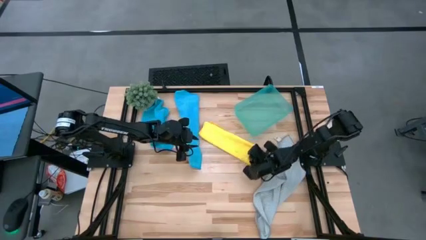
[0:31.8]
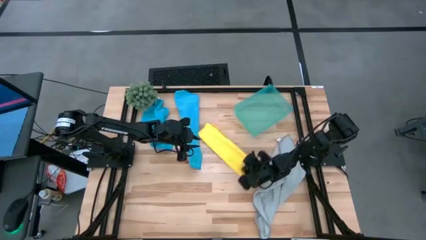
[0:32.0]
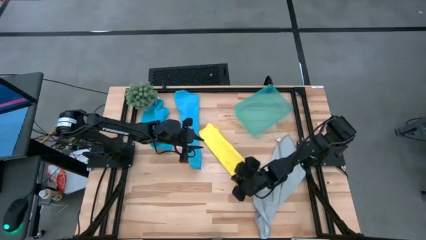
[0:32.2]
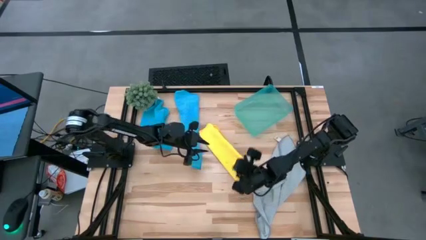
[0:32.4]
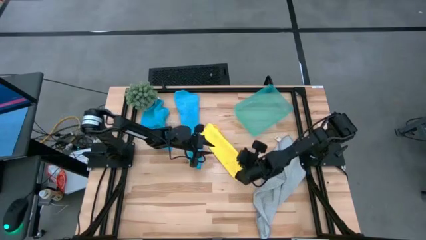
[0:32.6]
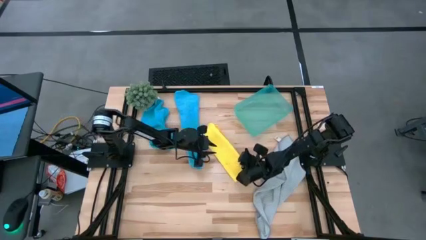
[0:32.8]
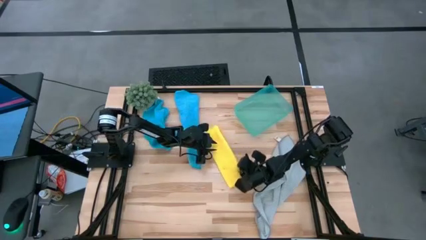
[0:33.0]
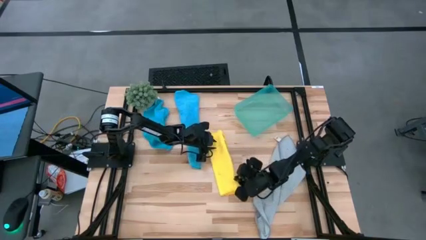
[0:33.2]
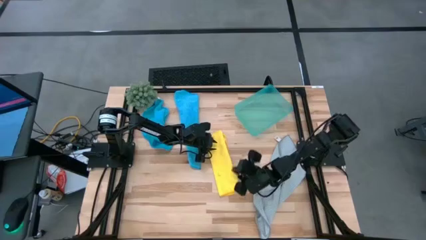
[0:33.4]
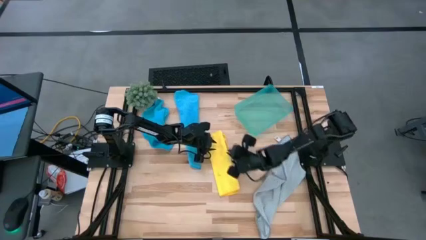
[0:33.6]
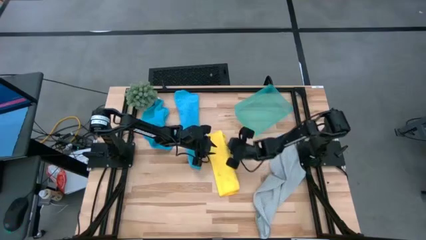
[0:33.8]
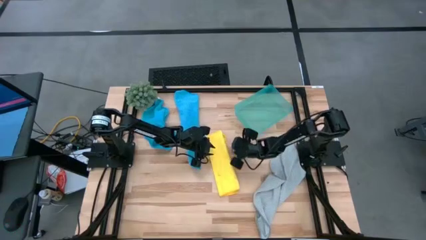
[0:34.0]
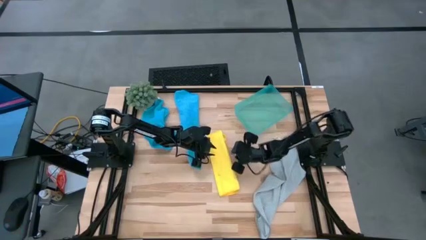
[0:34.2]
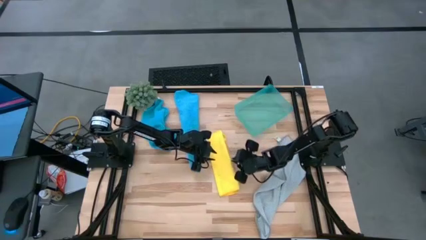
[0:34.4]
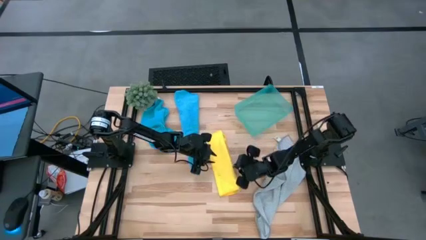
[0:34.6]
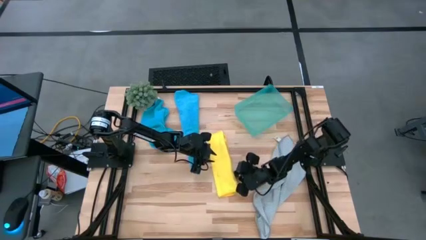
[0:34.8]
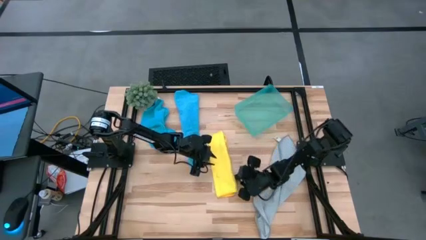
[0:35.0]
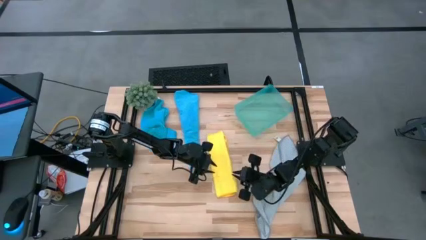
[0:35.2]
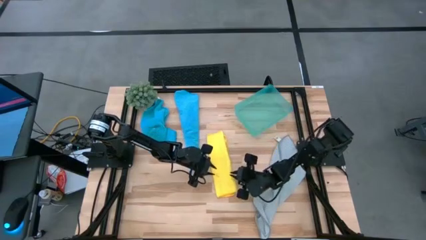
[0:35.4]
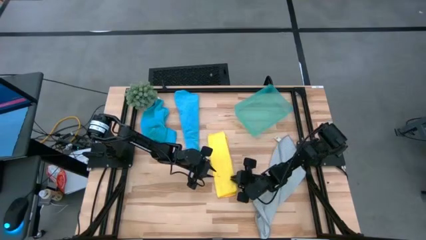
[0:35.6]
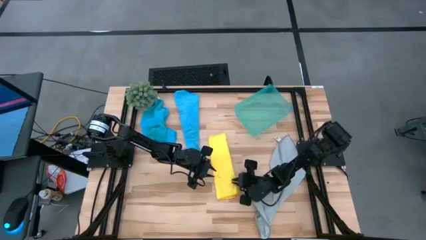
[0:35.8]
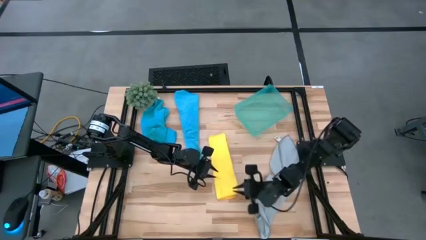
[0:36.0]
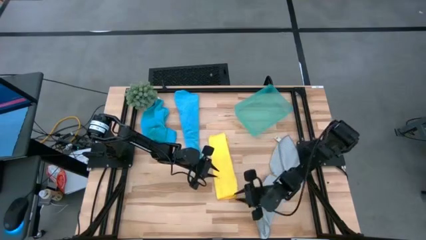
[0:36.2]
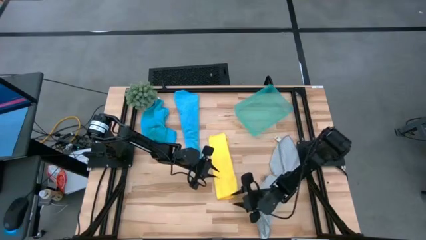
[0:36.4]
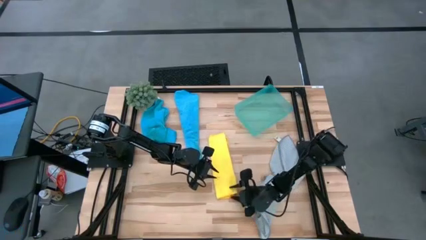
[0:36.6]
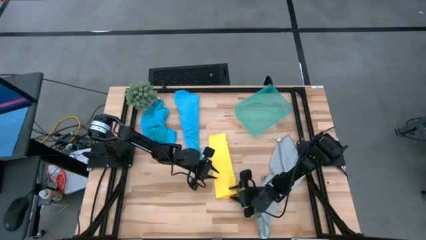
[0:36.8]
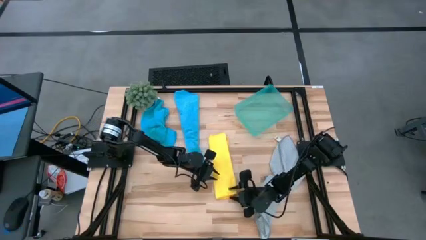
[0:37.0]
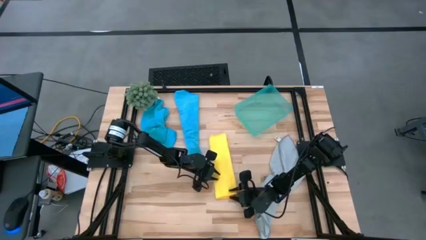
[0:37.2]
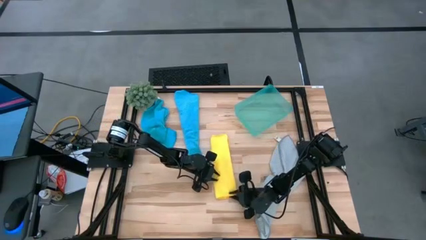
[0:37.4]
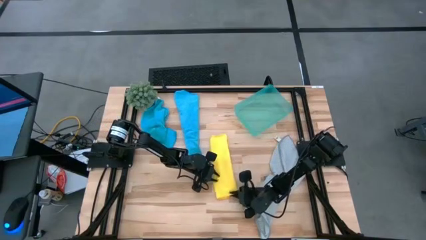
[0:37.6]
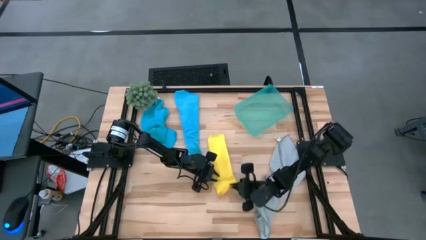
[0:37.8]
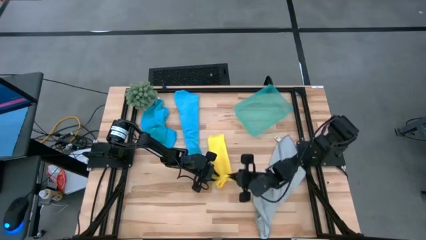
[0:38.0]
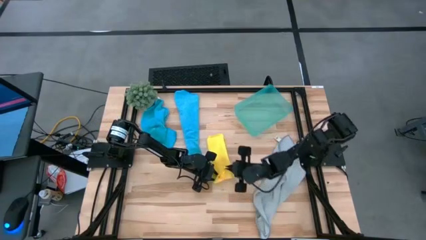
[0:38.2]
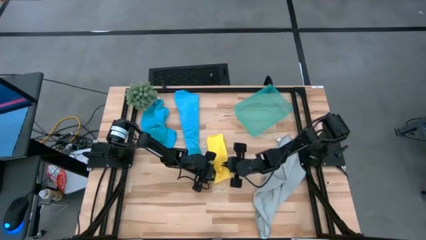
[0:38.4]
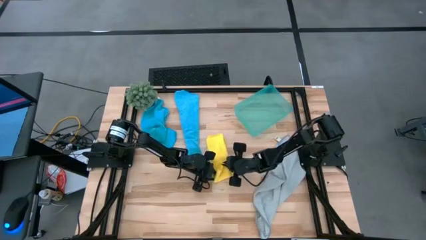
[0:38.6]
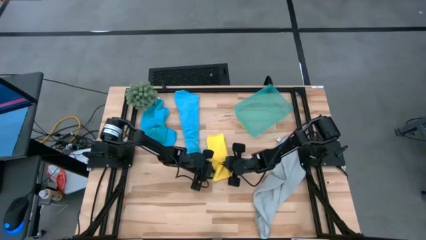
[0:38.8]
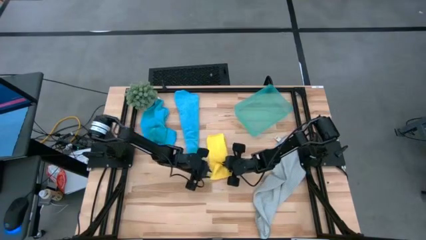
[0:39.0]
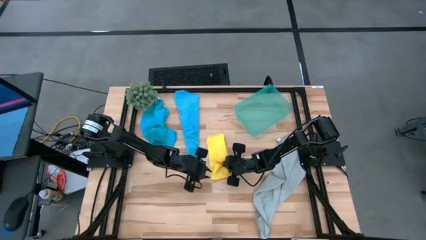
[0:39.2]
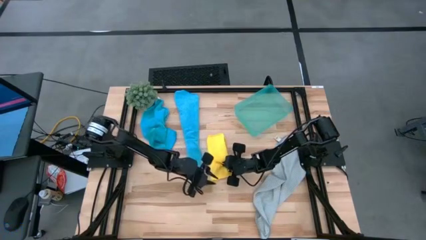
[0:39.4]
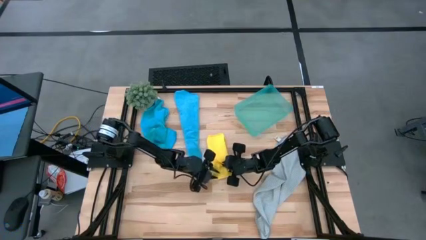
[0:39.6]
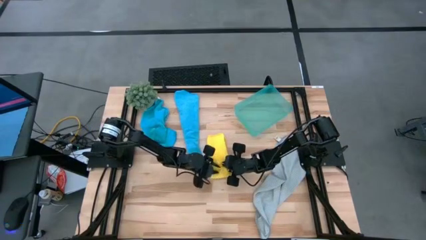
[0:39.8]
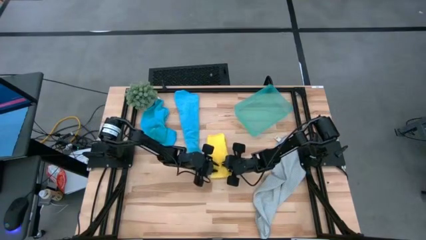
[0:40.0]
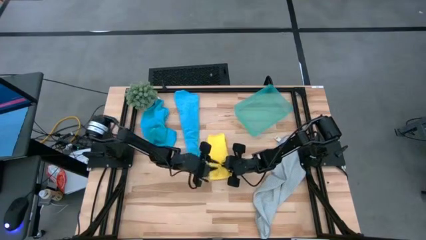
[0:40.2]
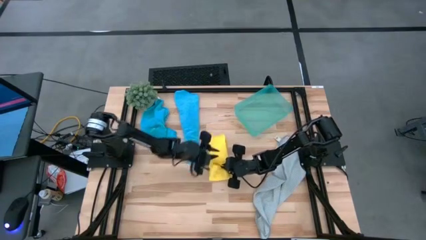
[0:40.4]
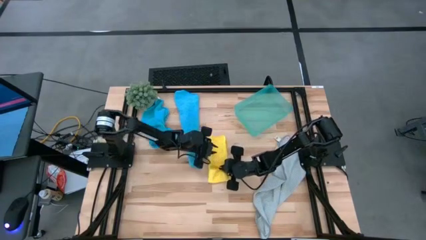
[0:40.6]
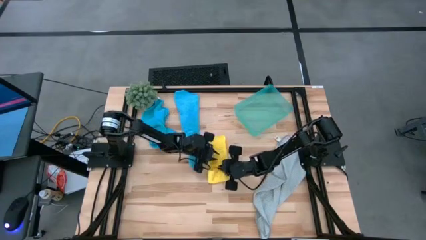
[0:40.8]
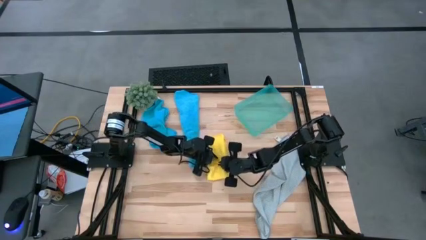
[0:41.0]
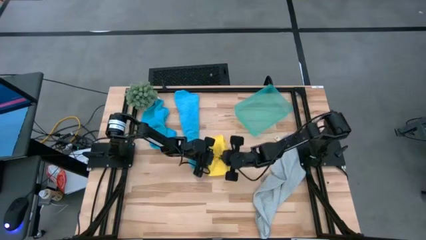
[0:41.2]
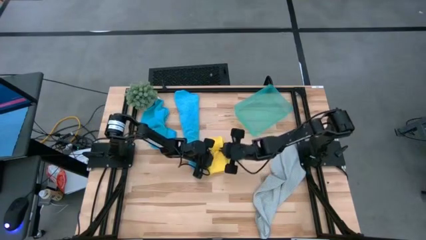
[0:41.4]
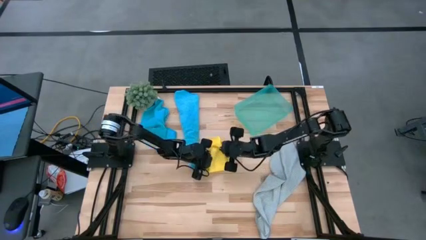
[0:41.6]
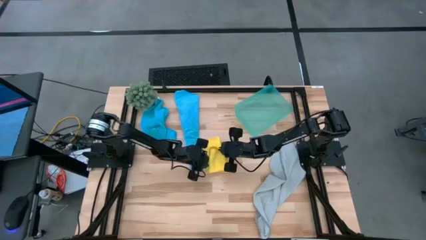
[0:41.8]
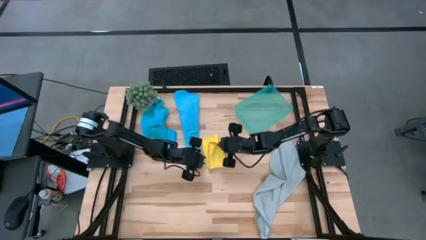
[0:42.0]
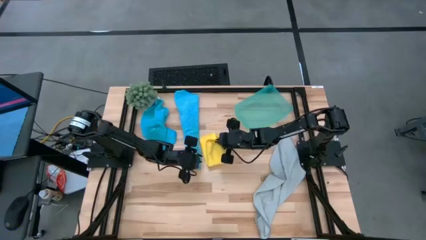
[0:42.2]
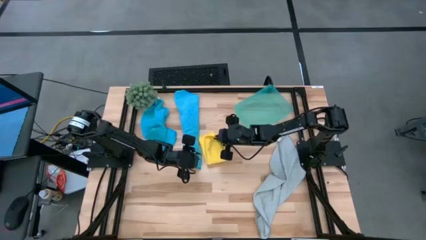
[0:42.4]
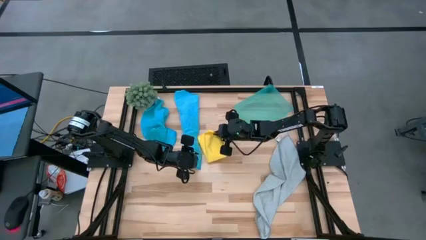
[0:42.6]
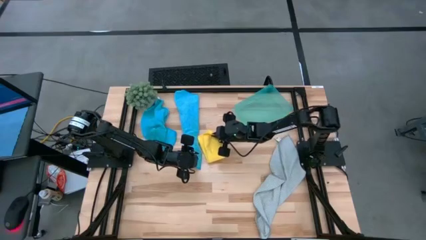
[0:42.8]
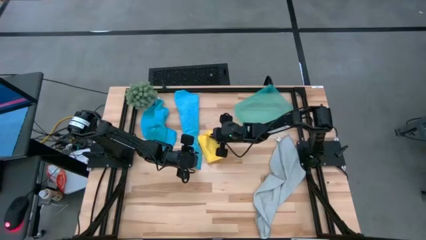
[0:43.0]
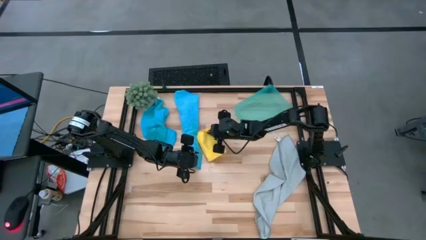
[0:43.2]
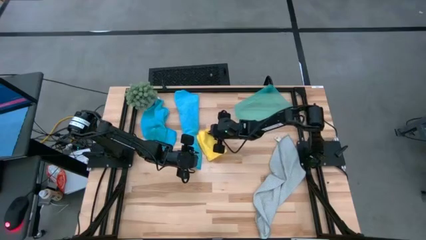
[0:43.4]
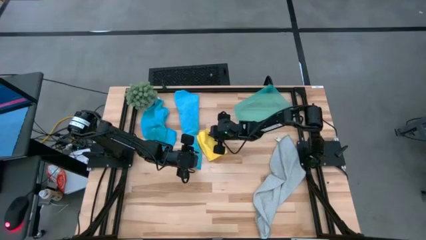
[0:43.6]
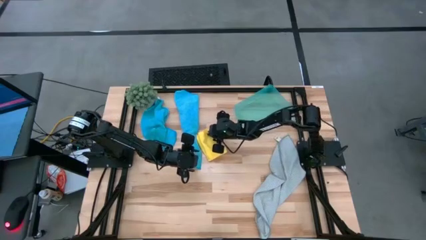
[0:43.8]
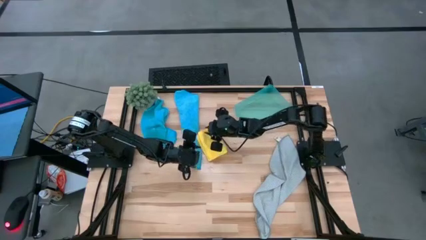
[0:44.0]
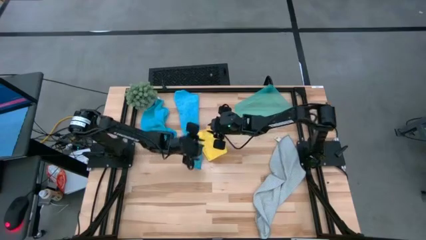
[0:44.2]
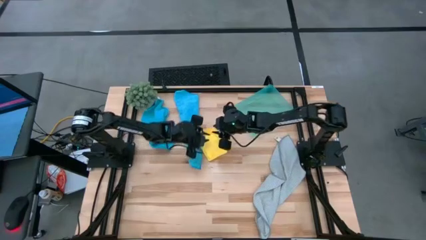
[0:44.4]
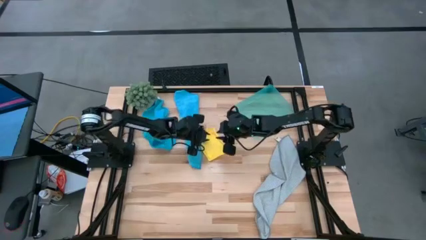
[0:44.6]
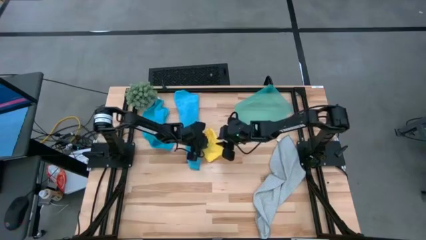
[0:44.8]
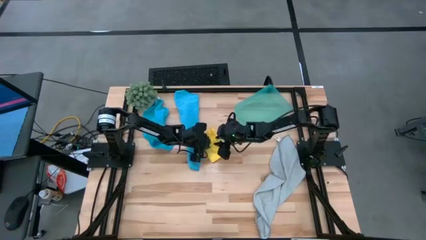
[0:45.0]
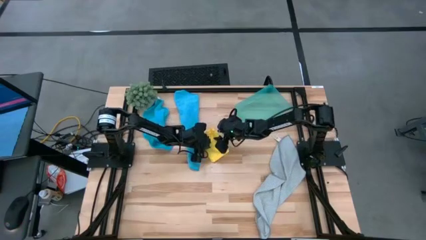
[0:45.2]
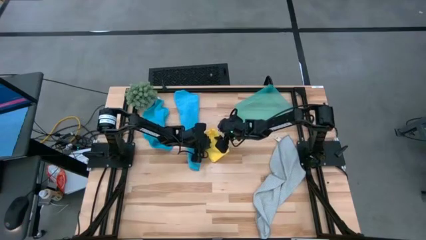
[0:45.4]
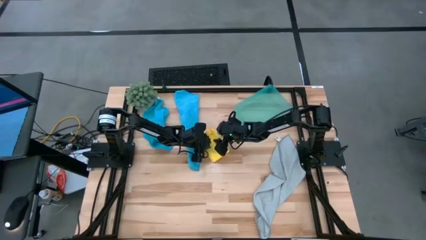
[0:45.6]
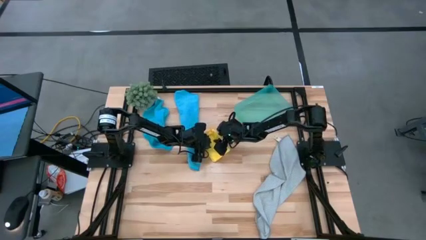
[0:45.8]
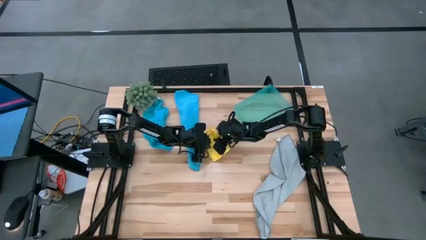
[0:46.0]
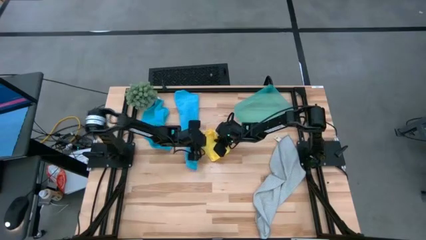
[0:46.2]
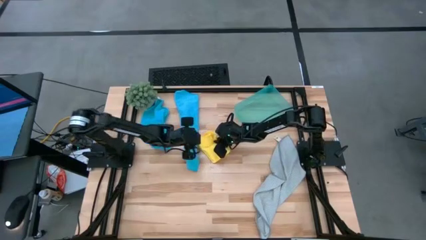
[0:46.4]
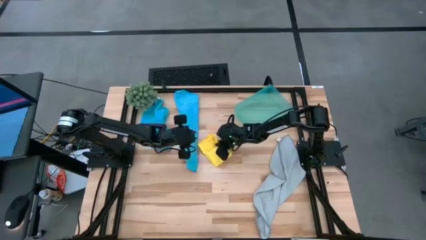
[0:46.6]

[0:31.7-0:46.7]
Task: Fold microfiber towels
Fold the yellow towel

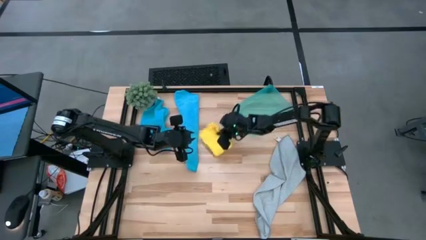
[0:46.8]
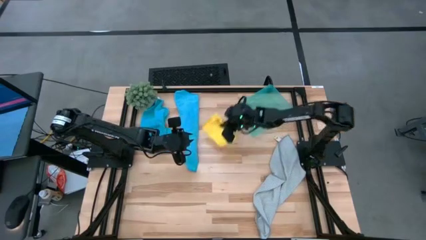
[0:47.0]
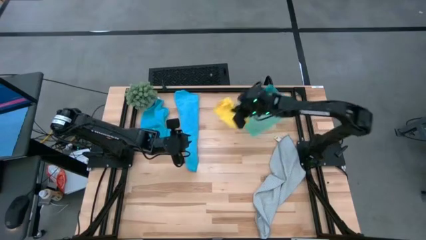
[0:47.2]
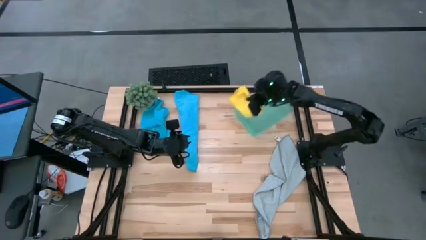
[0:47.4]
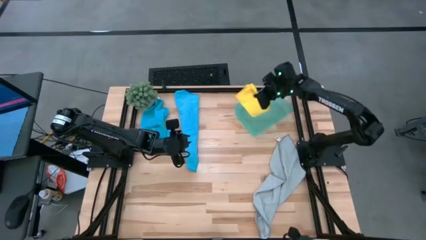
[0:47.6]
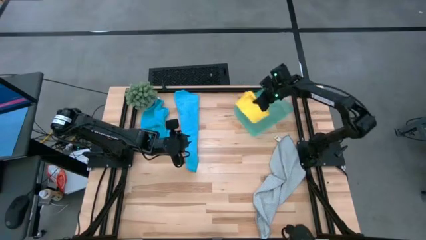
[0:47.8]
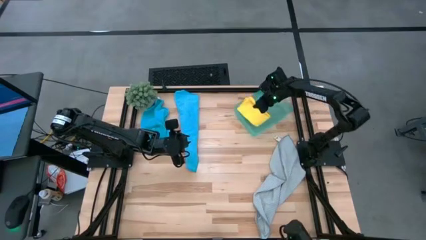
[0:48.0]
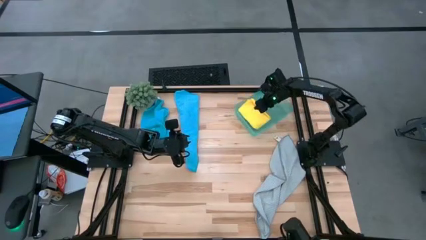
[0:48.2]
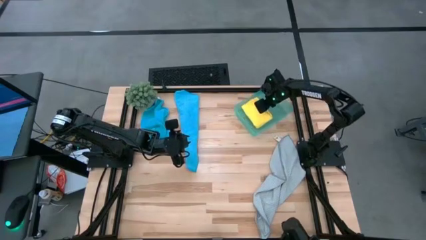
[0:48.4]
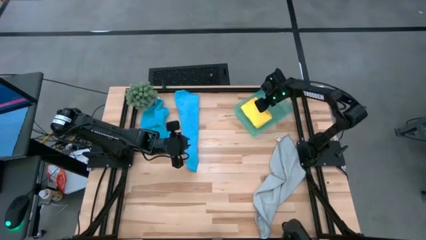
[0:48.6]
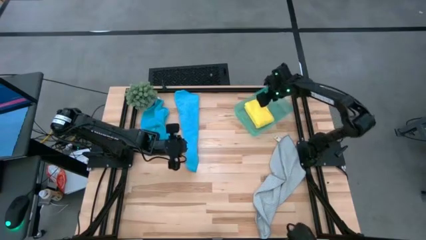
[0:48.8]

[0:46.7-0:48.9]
Put the yellow towel into the blue bin
